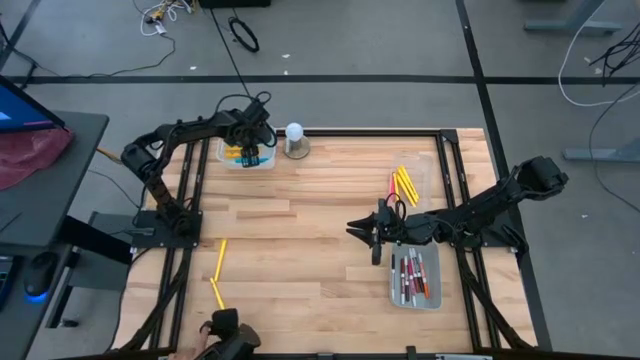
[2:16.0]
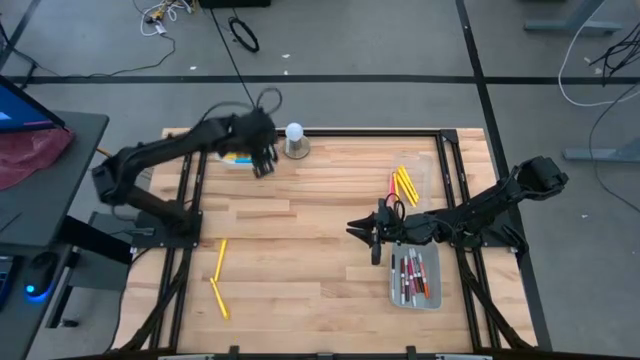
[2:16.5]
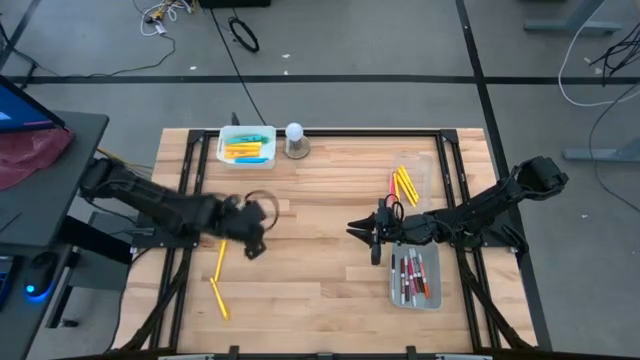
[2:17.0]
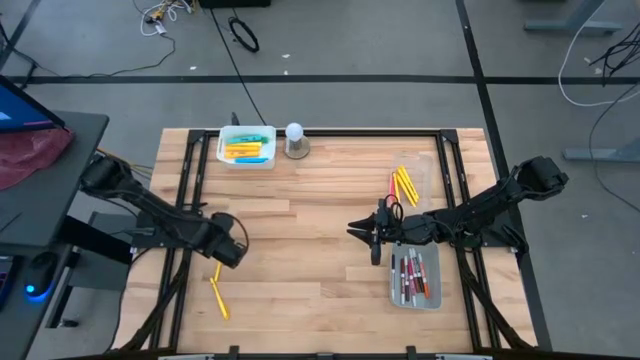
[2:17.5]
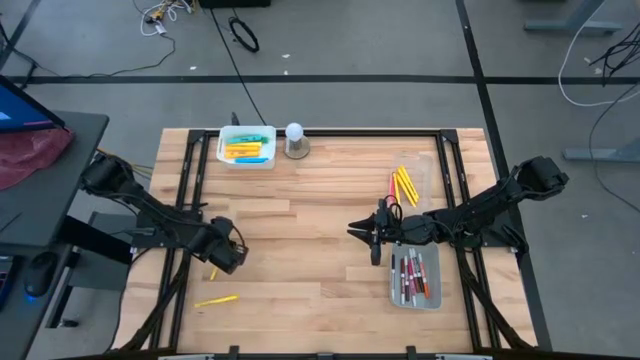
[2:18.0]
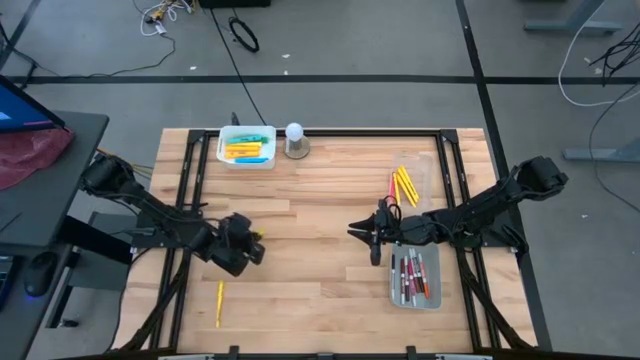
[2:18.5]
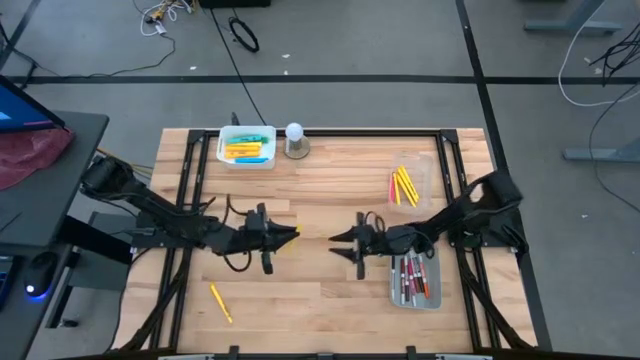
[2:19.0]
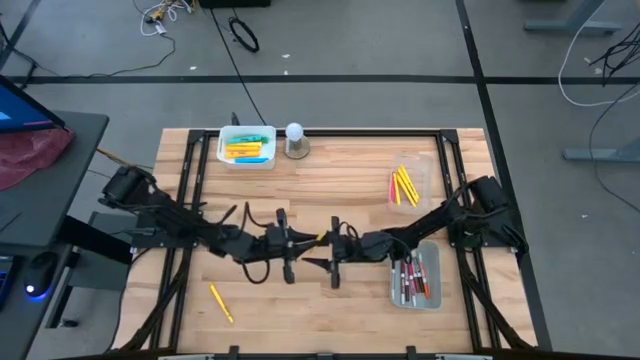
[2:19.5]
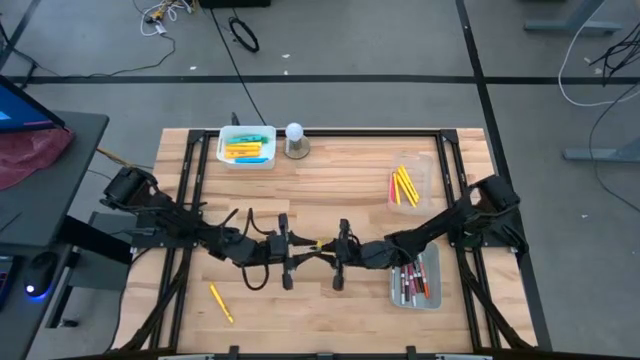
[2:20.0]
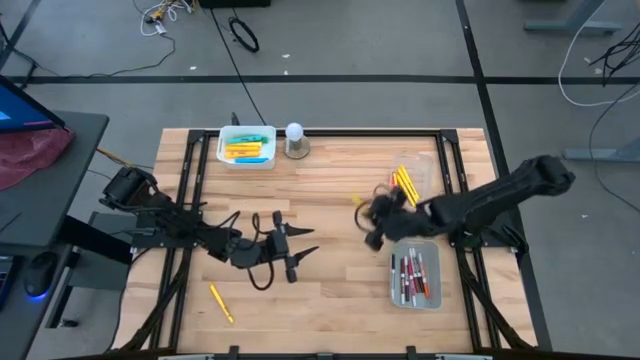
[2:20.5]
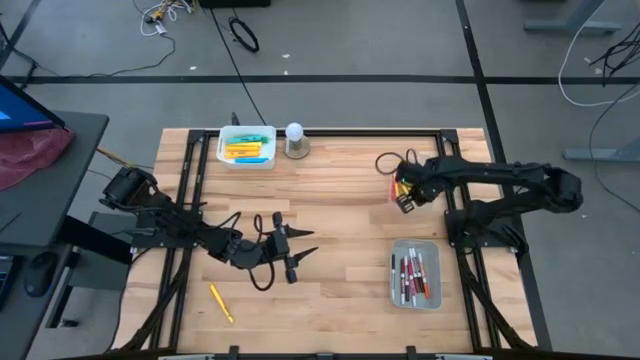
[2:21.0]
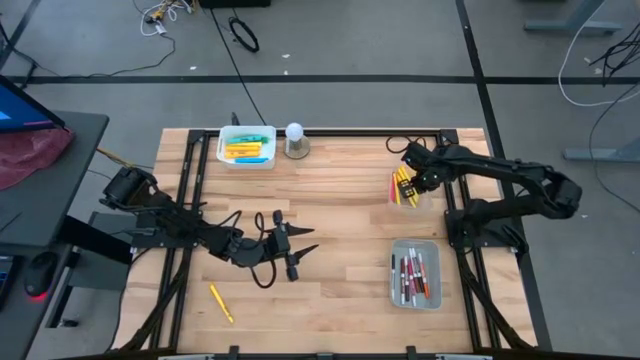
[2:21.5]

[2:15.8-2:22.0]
Task: Pick & Place Markers
Put the yellow pen into the transparent bin

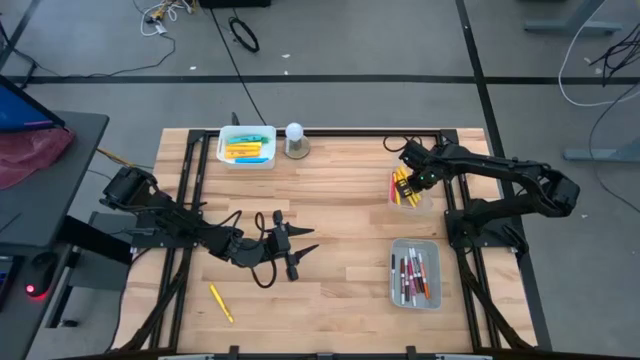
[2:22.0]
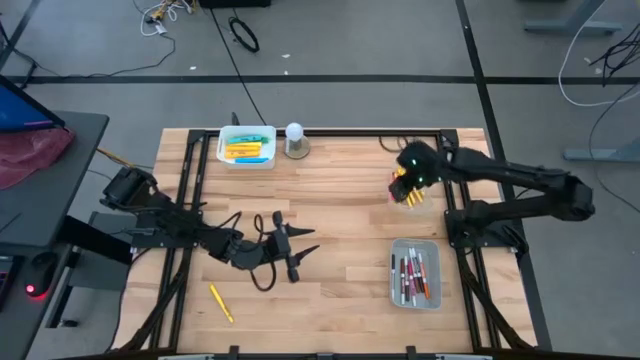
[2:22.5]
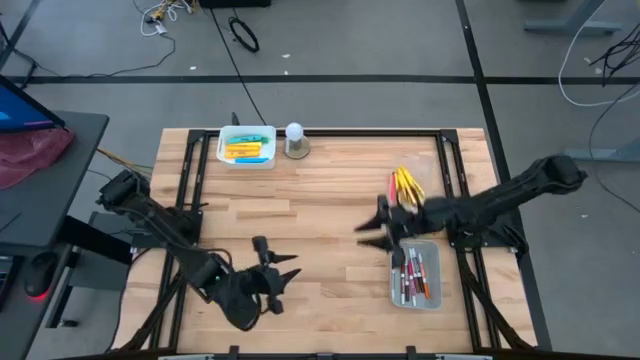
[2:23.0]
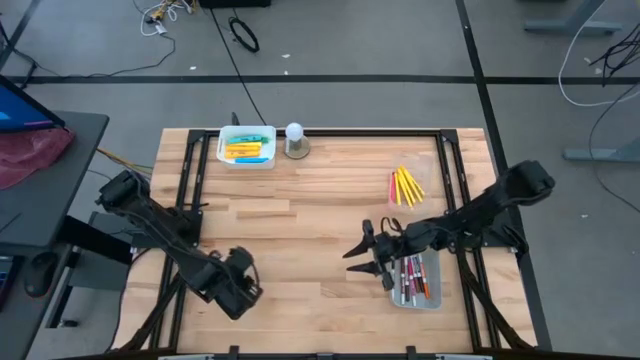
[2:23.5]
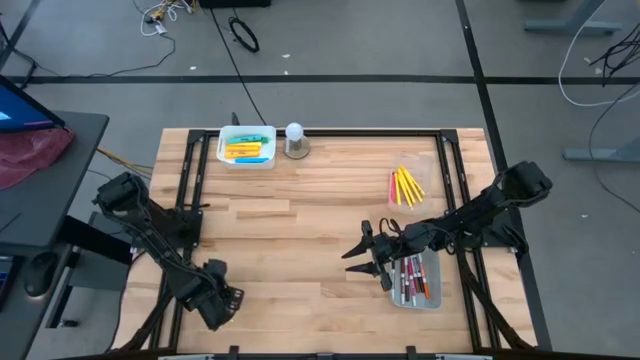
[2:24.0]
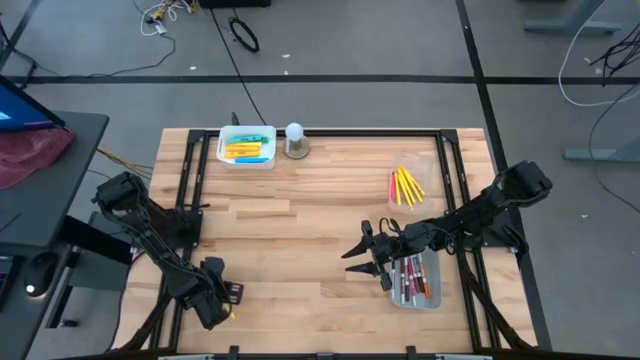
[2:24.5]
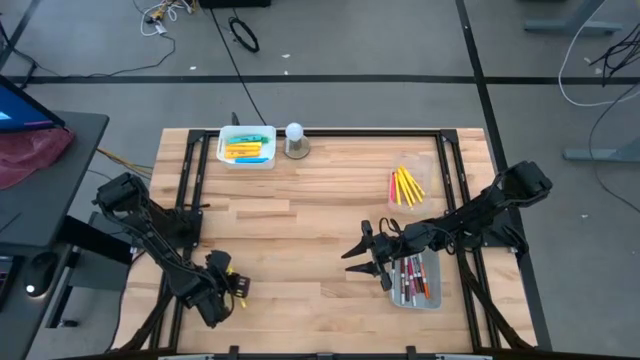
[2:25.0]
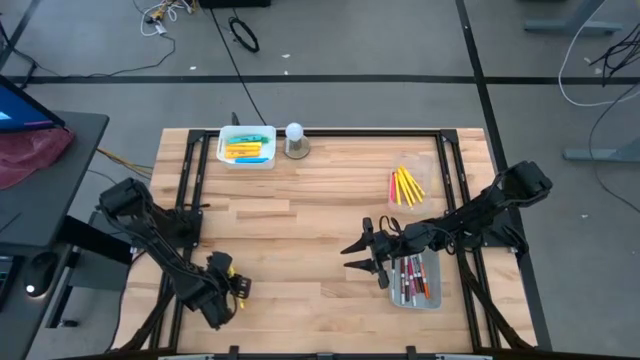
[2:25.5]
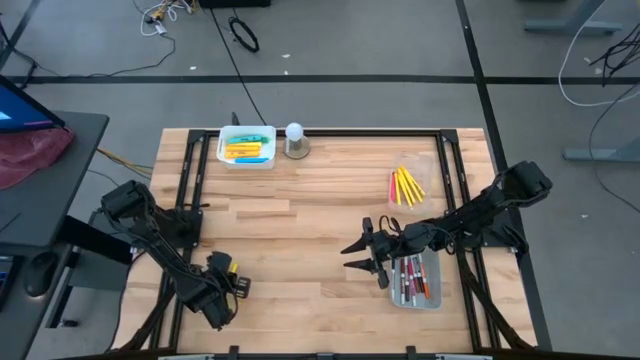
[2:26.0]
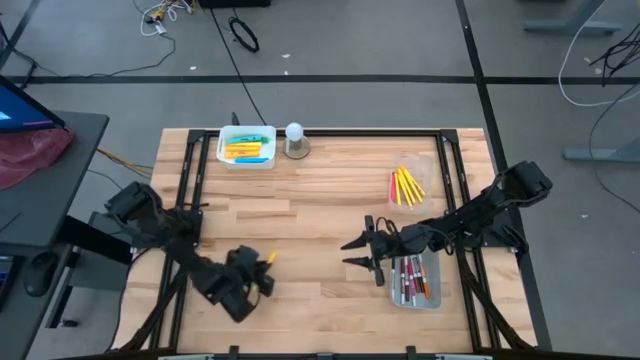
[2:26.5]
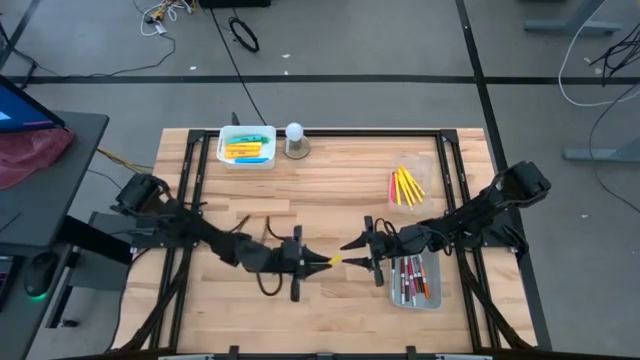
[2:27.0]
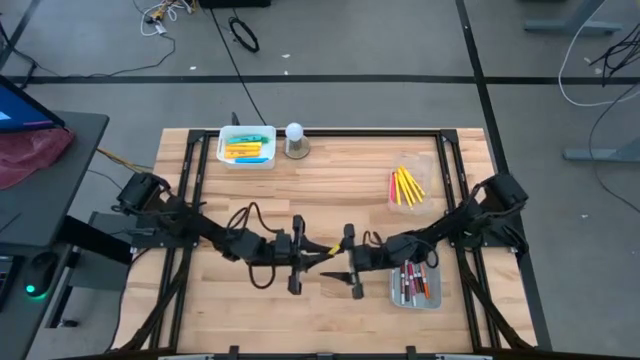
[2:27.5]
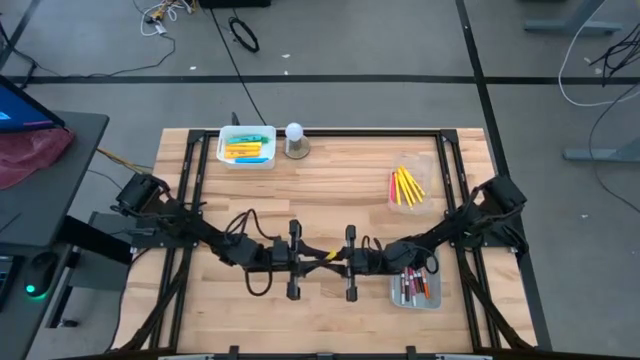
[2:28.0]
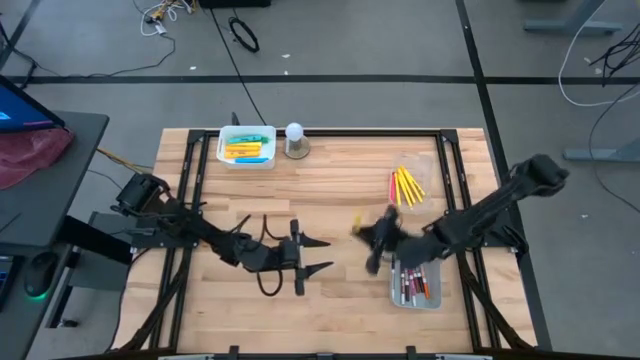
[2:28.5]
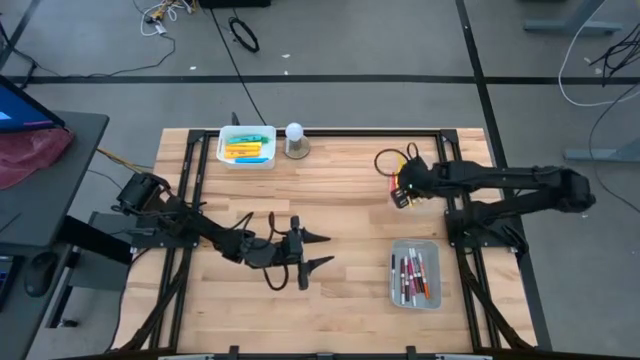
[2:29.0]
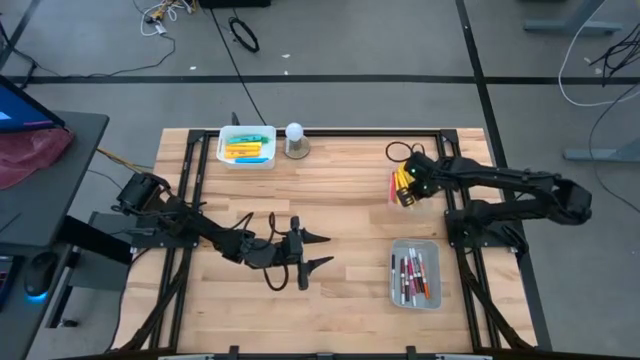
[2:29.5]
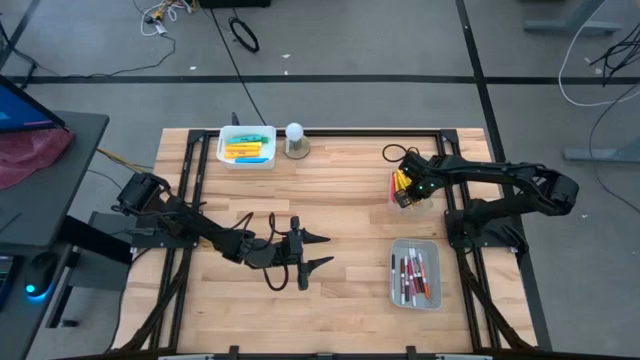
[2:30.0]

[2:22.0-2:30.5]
Put the yellow pen into the transparent bin

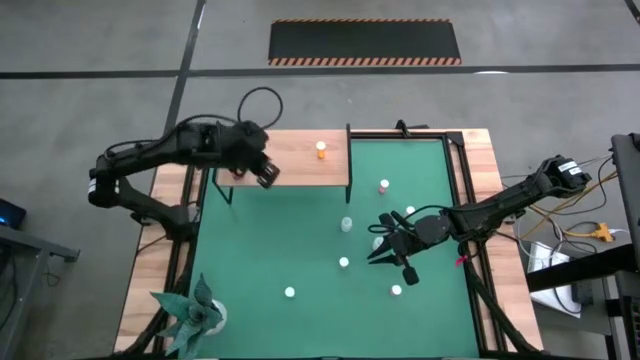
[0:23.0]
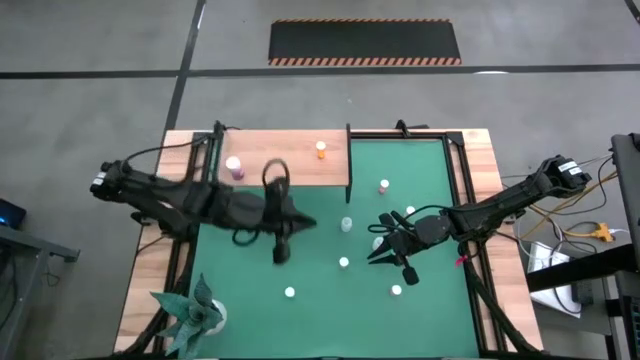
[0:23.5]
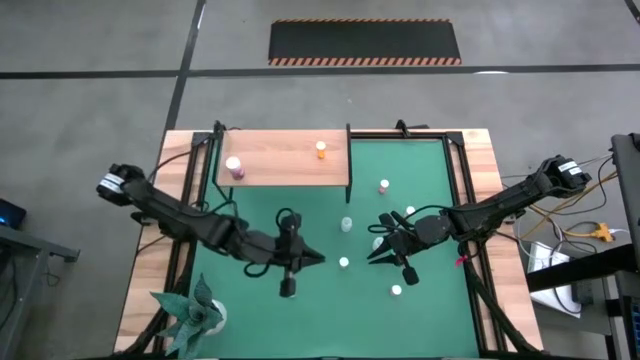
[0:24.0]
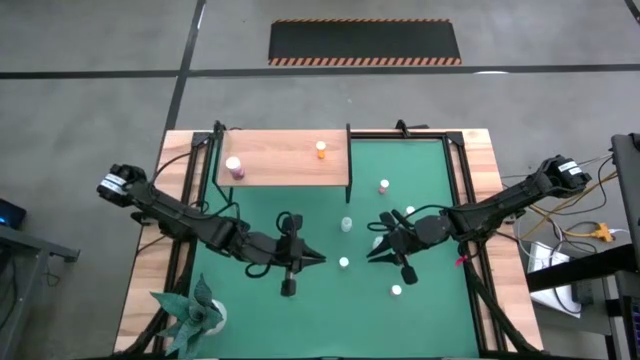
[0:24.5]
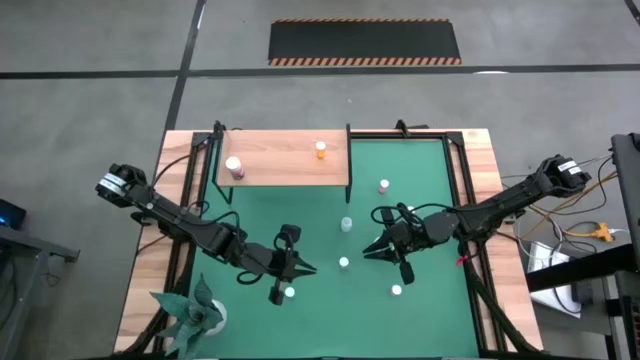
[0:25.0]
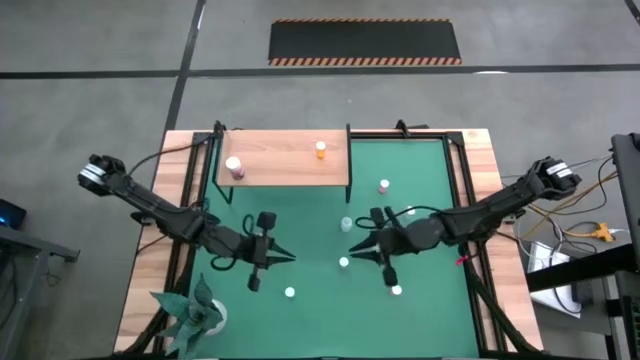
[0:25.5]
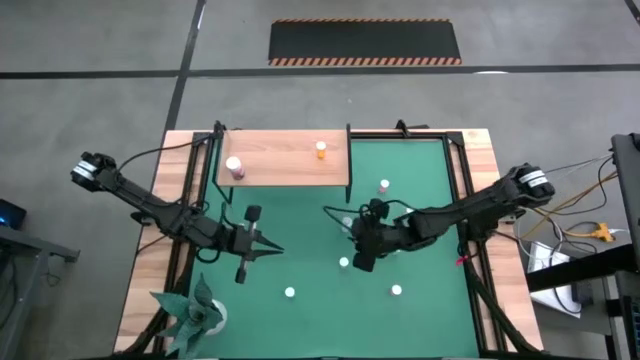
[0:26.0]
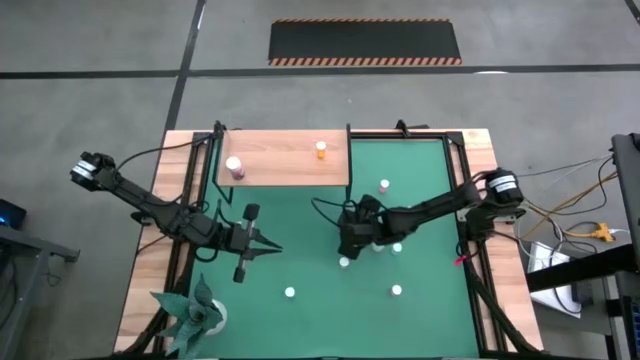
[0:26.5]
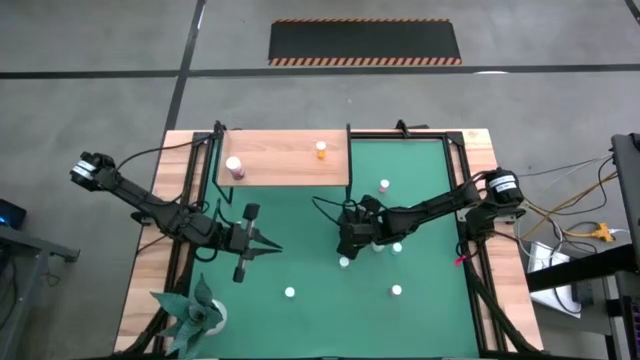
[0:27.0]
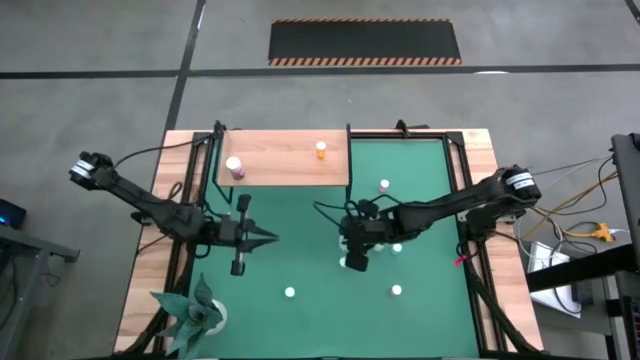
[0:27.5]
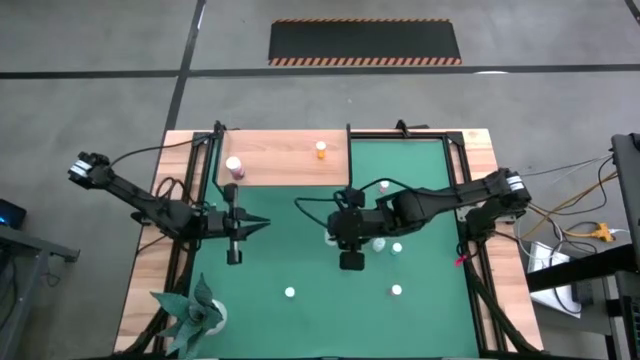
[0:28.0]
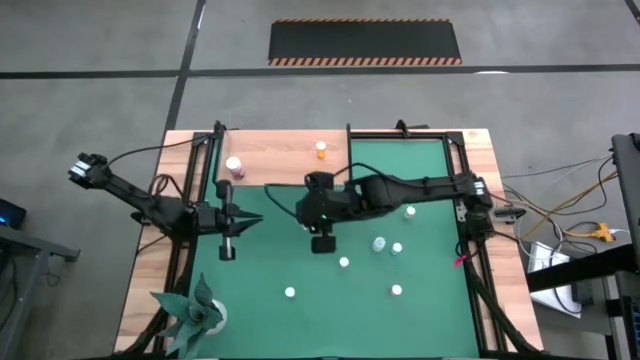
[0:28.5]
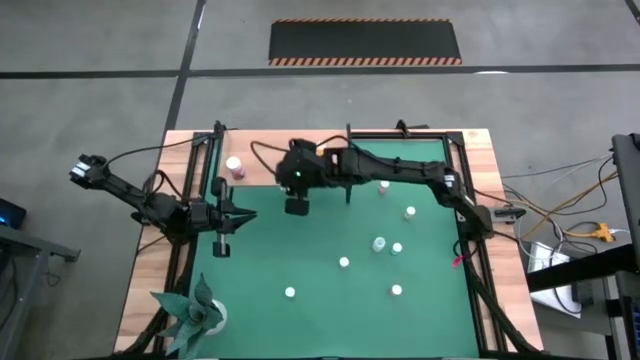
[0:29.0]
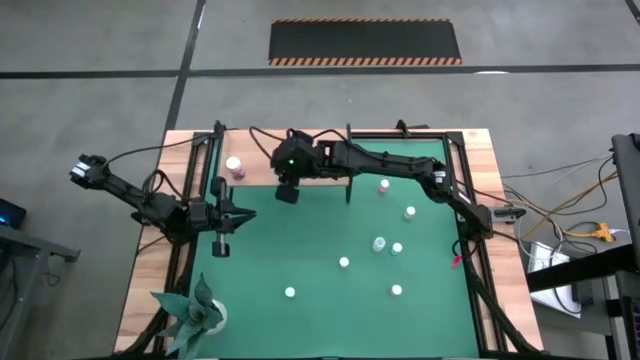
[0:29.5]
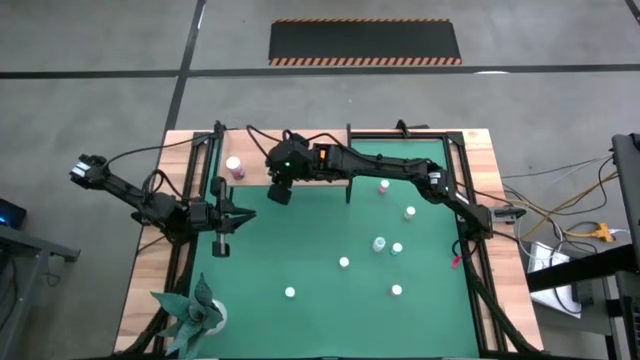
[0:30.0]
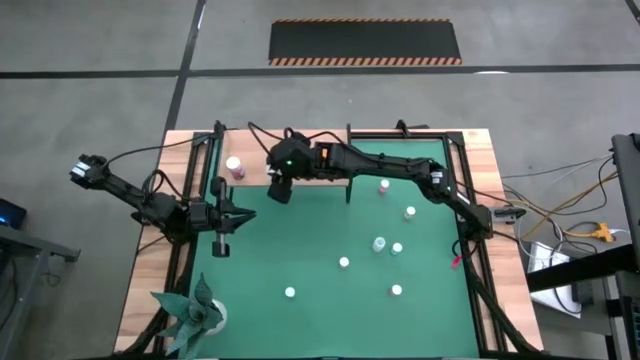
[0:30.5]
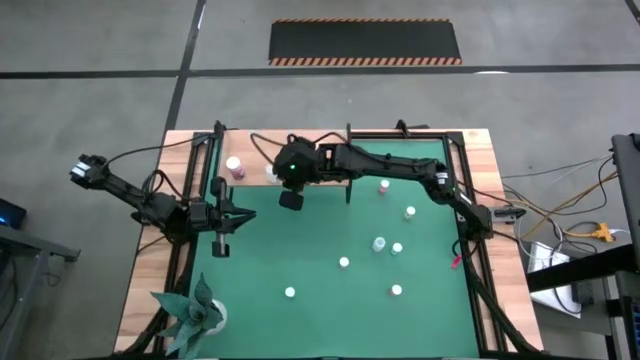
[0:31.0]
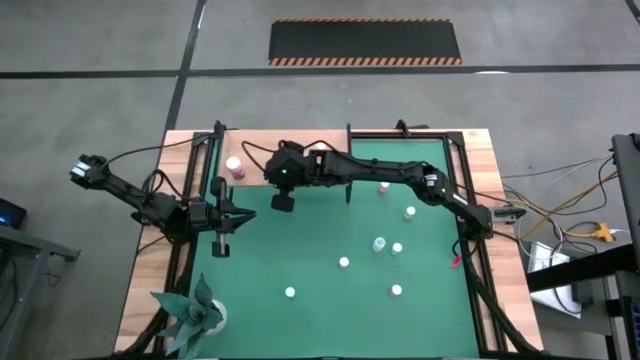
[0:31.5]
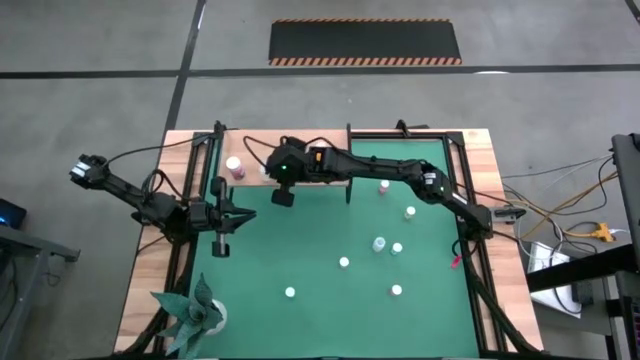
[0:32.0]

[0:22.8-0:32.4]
Task: Pick and place medicine bottles onto shelf by color
Put the left white pill bottle on the shelf
